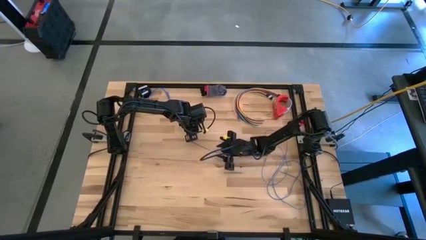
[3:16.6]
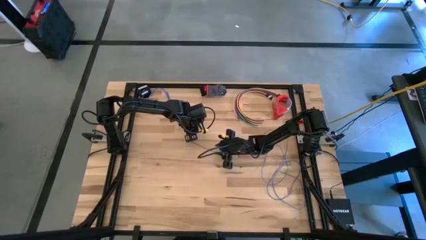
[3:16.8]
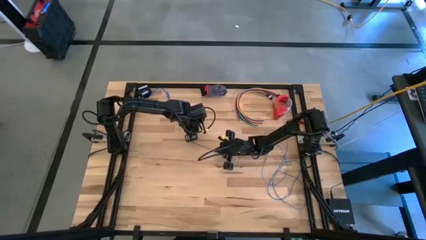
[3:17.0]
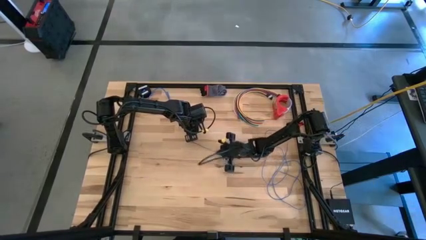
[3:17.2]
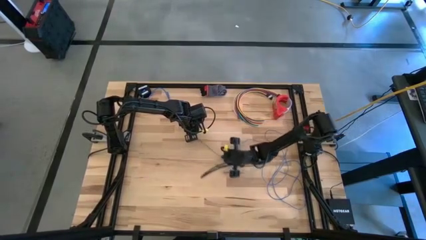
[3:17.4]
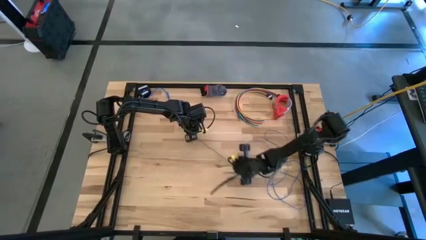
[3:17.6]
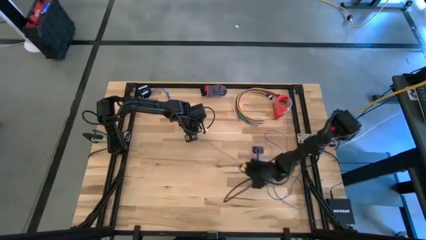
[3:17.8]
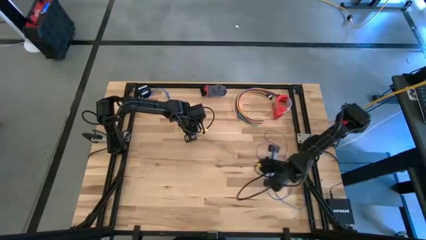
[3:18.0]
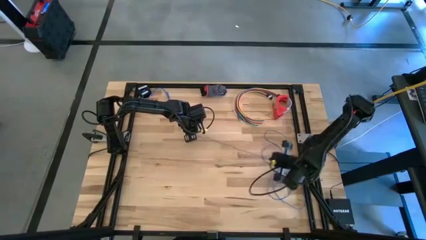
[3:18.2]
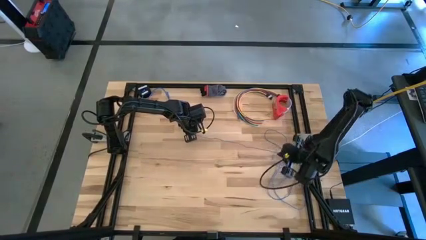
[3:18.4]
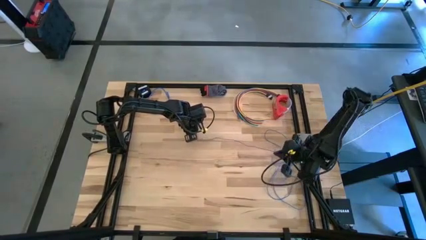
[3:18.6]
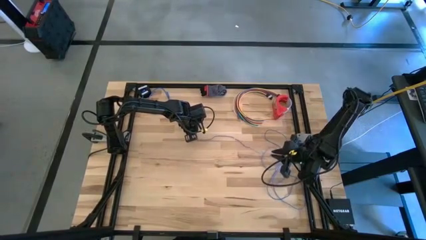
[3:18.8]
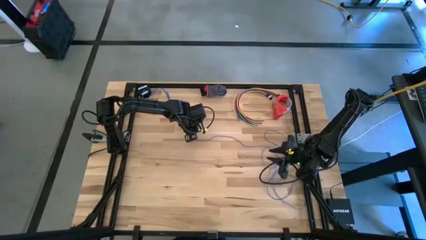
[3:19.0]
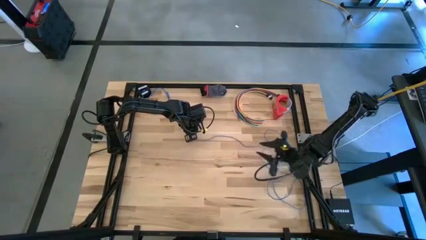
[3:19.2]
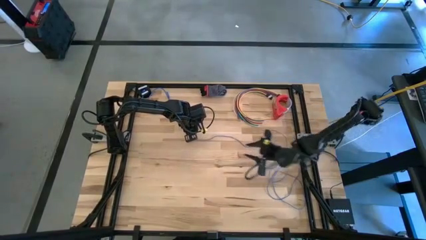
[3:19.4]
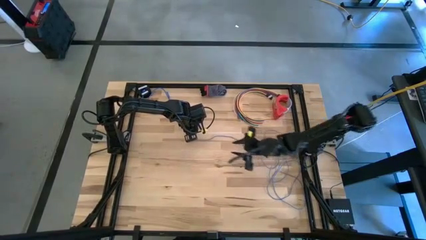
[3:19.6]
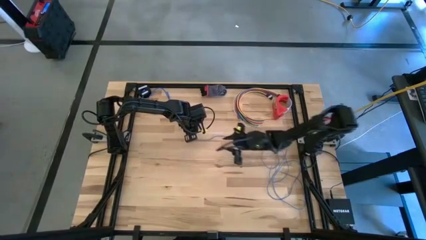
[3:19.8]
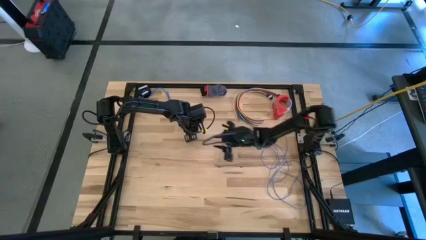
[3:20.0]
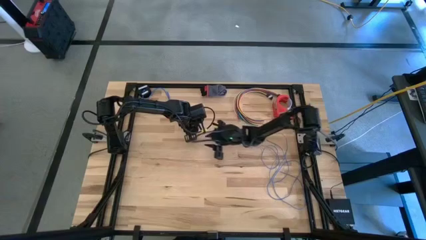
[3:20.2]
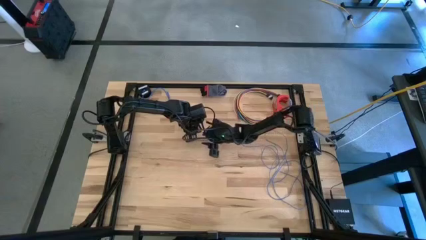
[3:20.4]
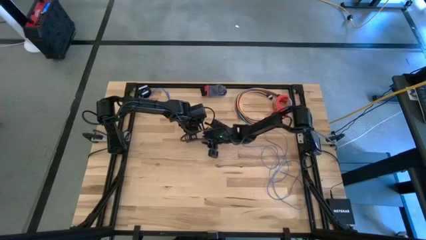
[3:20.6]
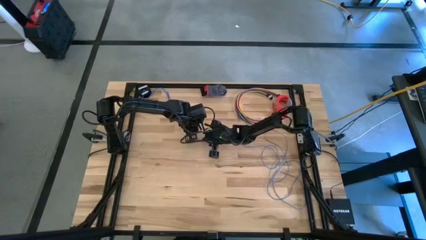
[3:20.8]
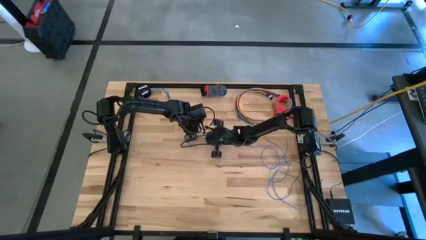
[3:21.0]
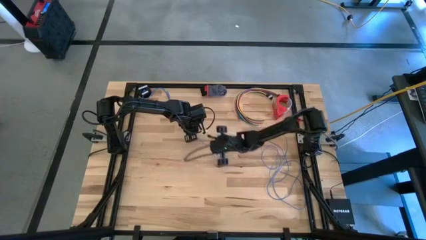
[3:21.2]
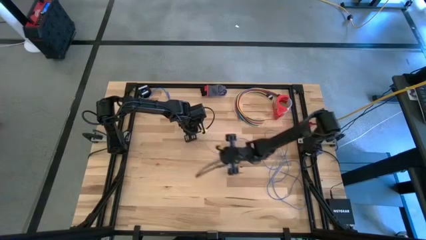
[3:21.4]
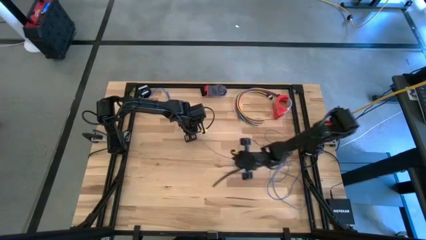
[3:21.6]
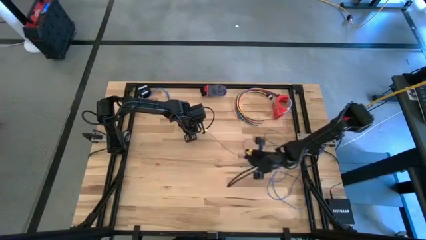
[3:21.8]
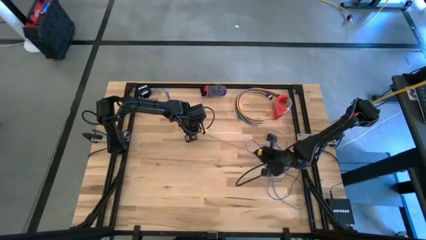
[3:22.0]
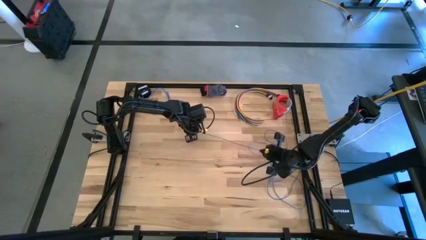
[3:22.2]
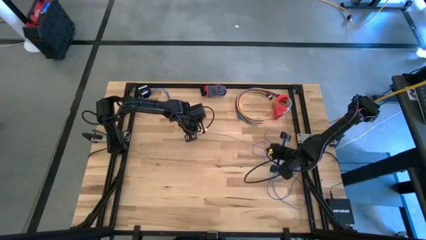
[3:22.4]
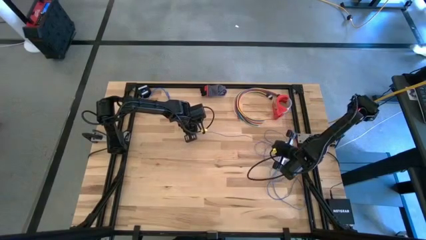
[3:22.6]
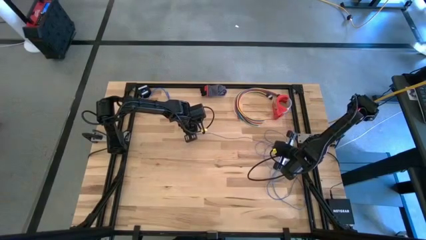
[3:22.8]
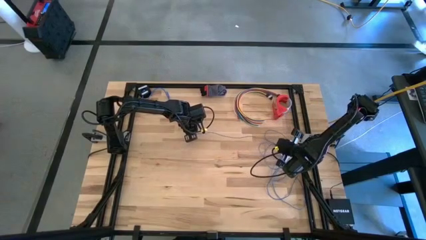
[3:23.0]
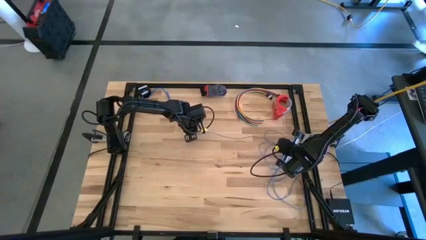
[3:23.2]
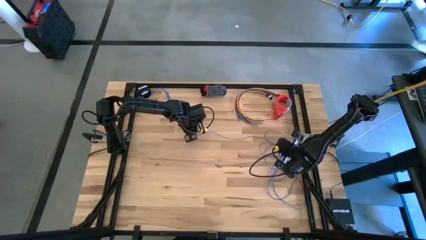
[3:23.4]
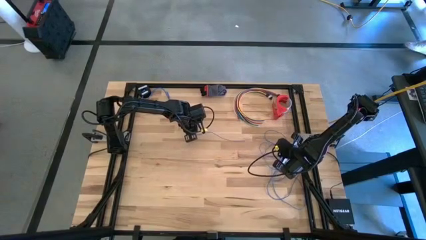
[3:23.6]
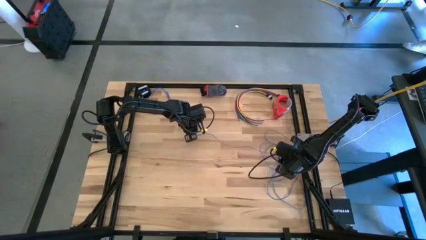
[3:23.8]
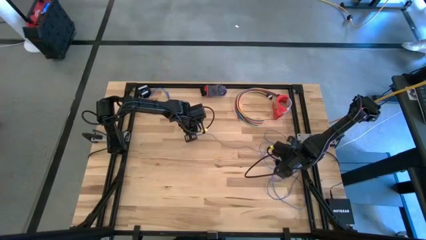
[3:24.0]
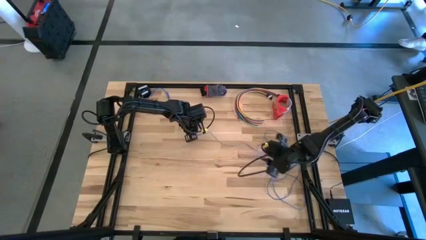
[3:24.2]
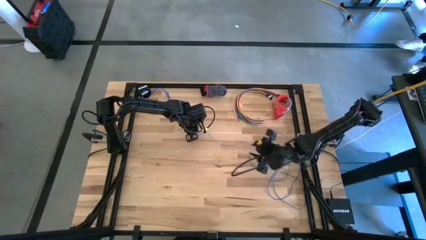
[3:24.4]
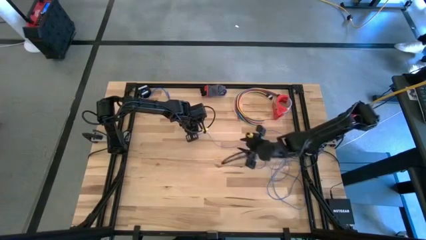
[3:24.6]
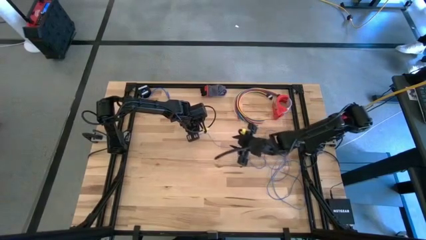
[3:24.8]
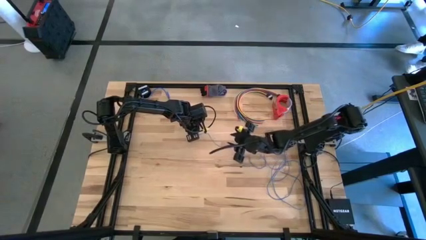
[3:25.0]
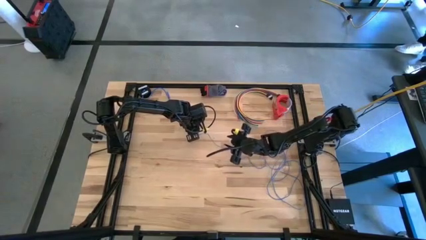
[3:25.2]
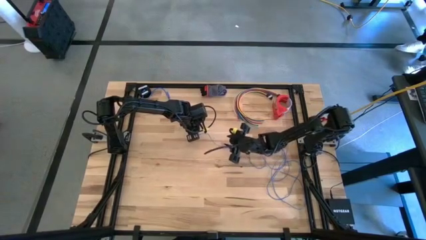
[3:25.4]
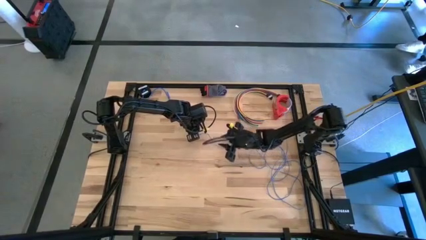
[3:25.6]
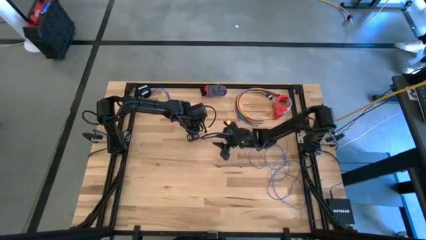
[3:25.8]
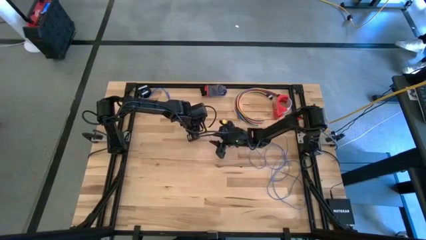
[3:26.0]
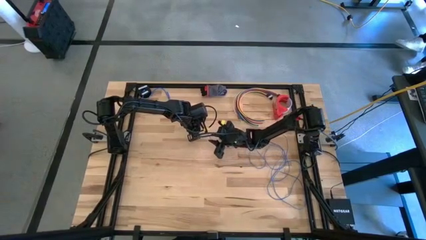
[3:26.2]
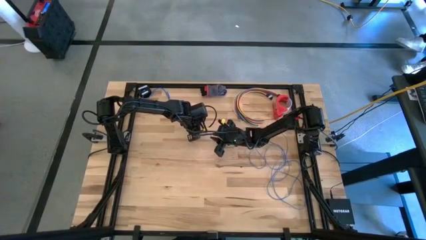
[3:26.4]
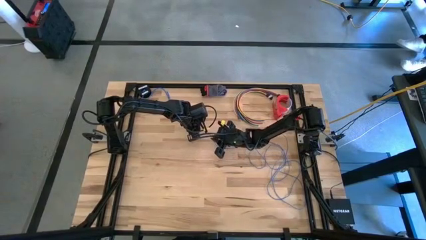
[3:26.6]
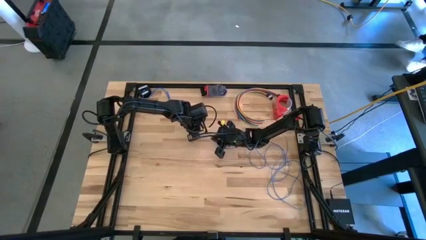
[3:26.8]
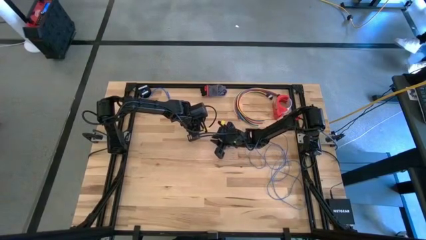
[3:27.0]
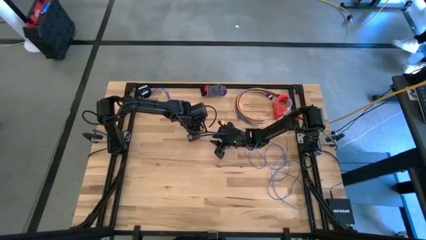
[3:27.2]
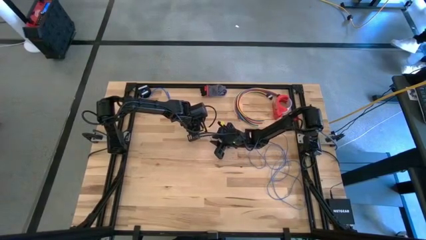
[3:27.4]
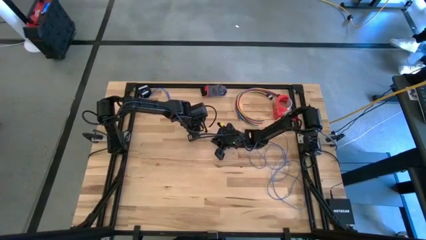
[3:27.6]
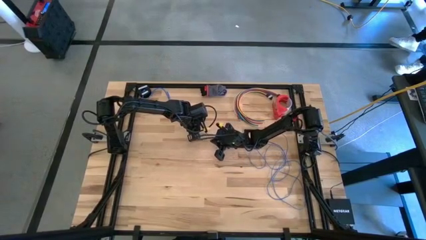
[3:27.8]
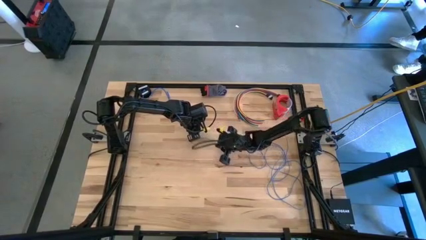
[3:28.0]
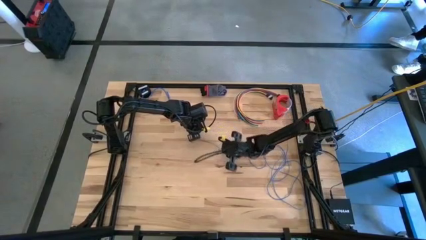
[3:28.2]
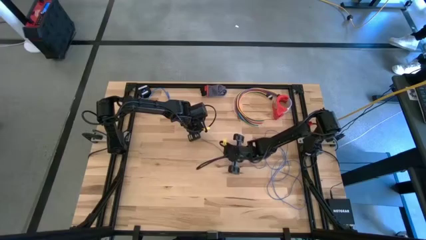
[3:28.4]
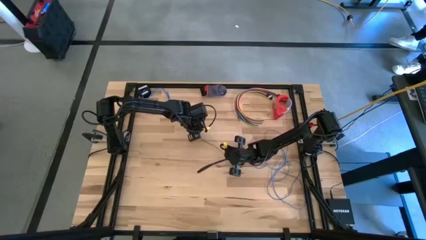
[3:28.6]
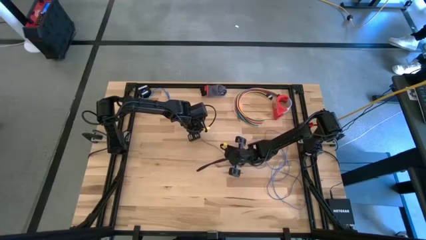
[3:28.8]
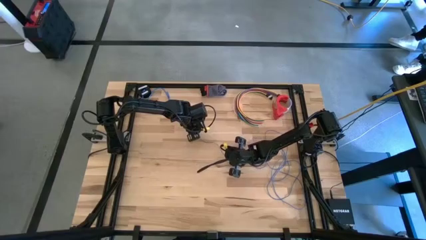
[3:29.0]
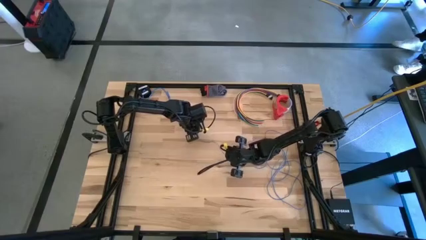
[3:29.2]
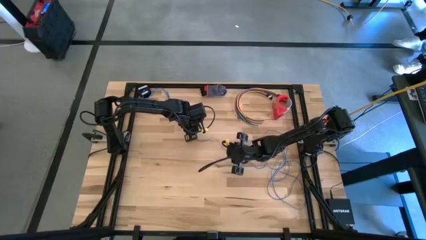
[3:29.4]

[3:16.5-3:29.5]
Task: Coil cords
Uncoil the blue wire from the black spool

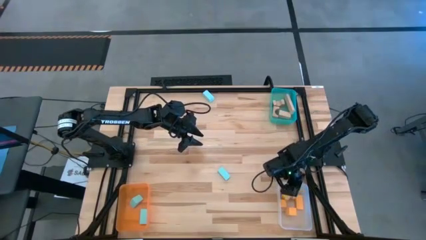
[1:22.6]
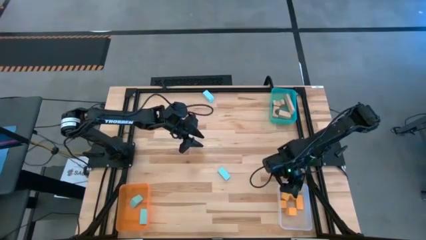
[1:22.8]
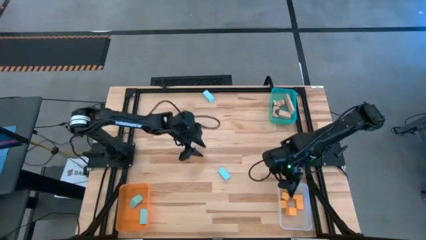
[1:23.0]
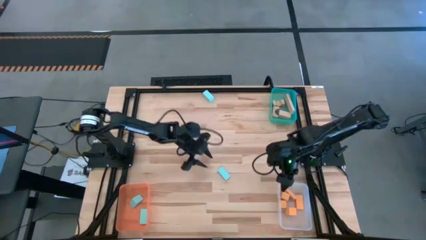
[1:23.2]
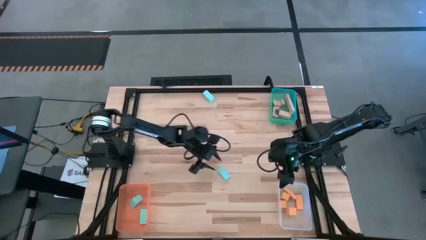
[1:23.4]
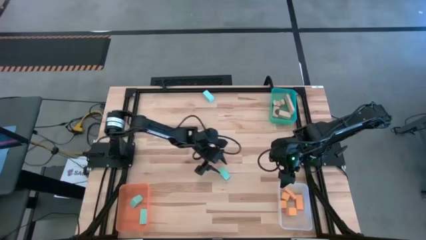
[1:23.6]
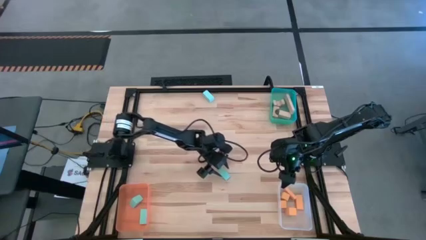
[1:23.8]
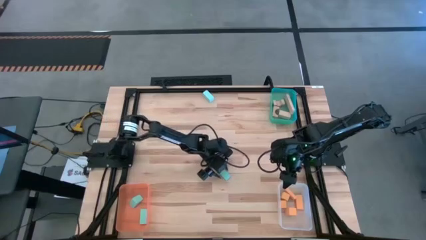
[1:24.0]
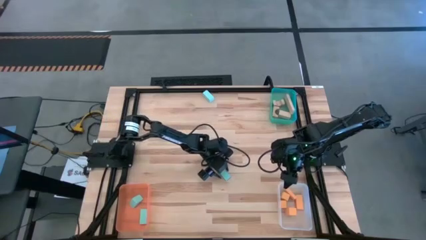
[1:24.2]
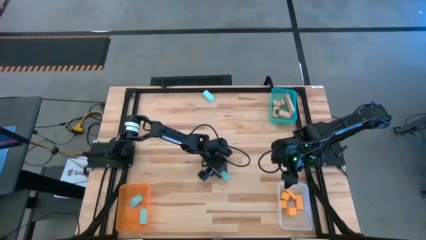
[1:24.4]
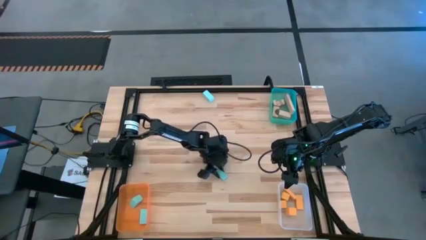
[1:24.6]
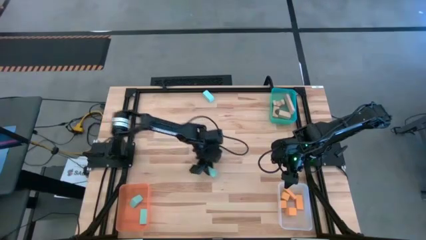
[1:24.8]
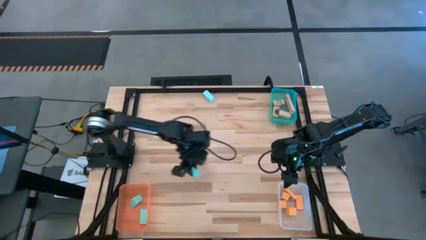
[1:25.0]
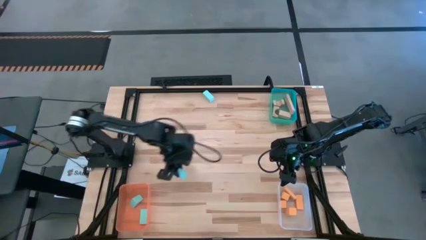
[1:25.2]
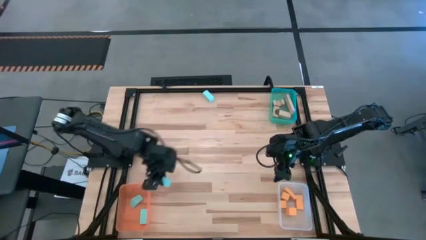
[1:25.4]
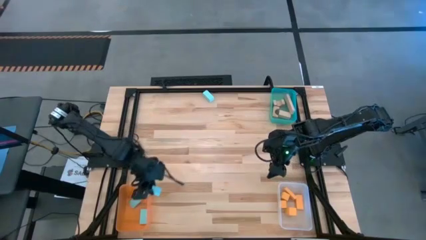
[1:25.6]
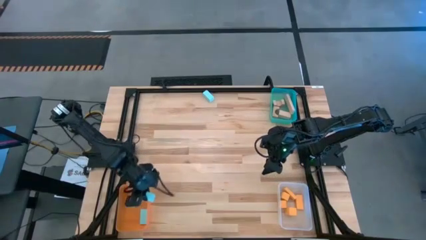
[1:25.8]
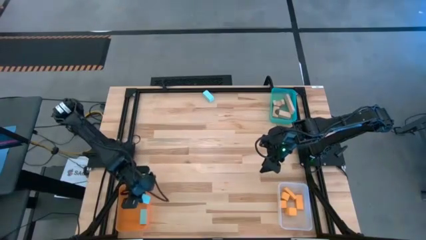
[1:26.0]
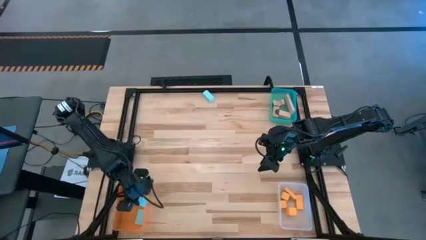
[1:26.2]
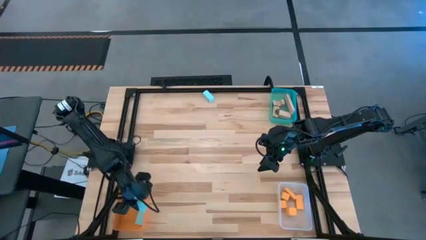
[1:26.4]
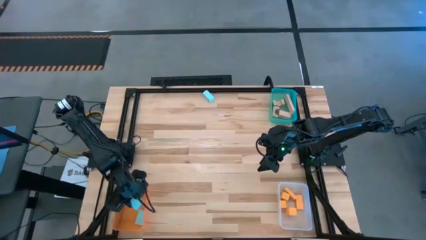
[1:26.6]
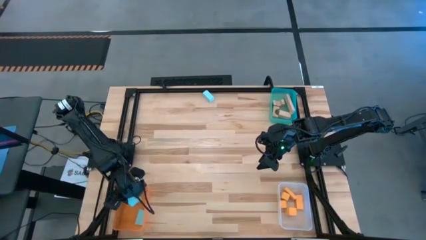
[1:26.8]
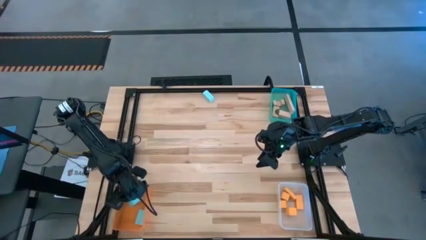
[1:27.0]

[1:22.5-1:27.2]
Task: Sort & place blocks by color
Put the blue block into the orange bin
